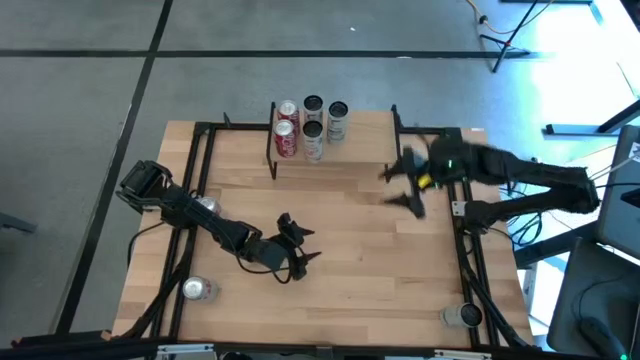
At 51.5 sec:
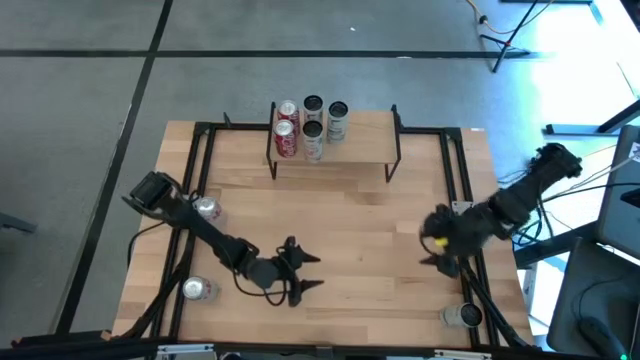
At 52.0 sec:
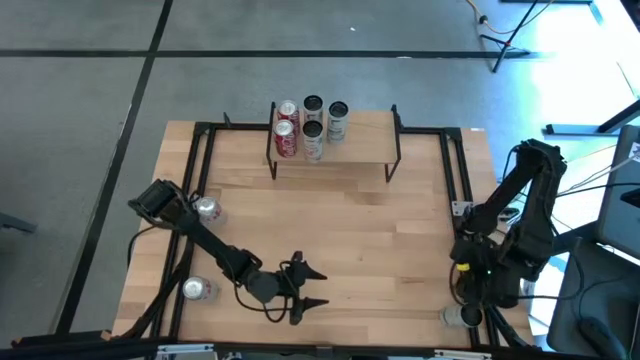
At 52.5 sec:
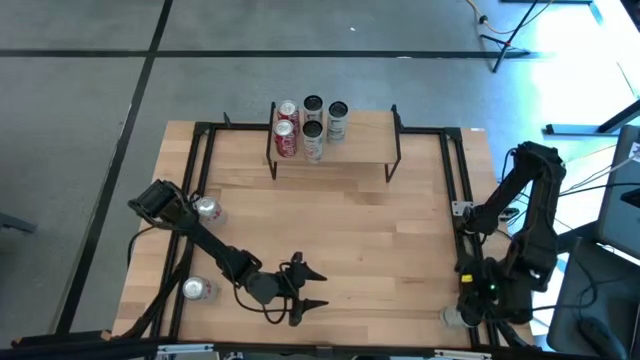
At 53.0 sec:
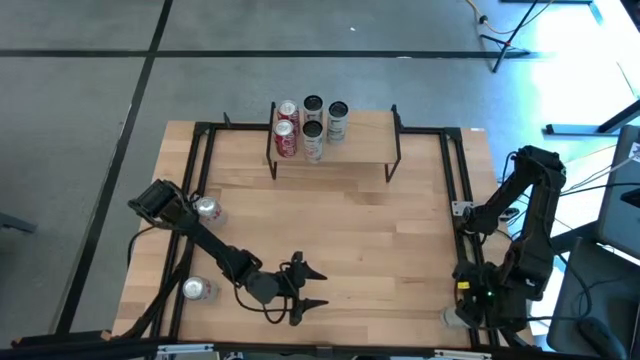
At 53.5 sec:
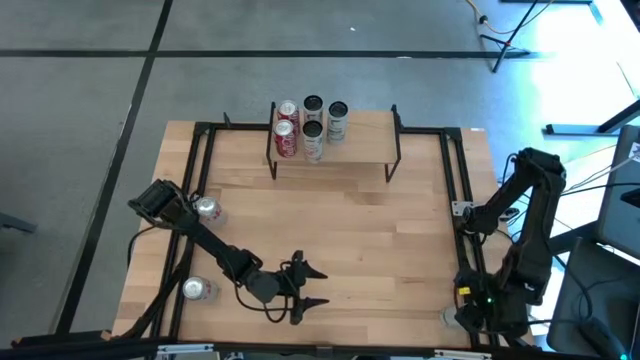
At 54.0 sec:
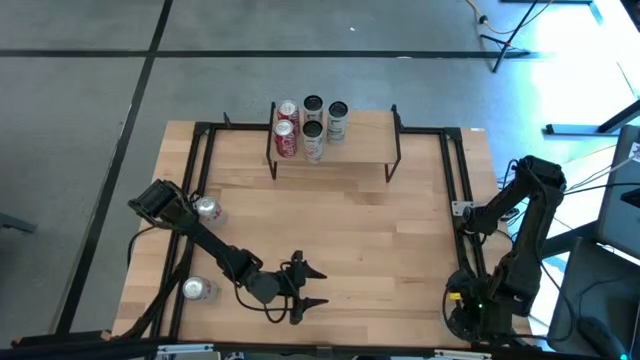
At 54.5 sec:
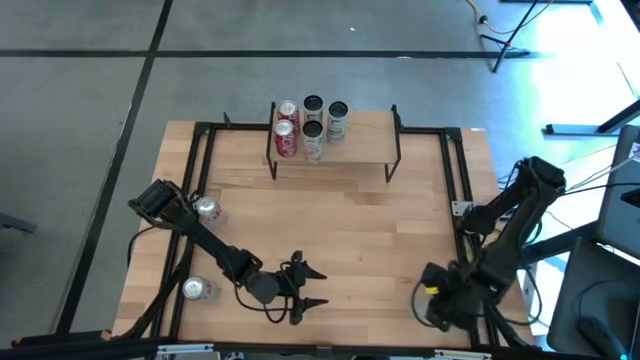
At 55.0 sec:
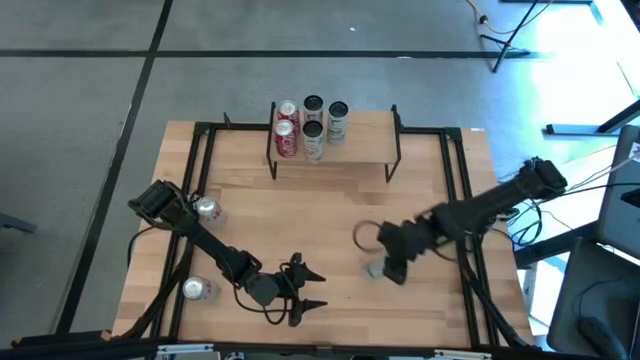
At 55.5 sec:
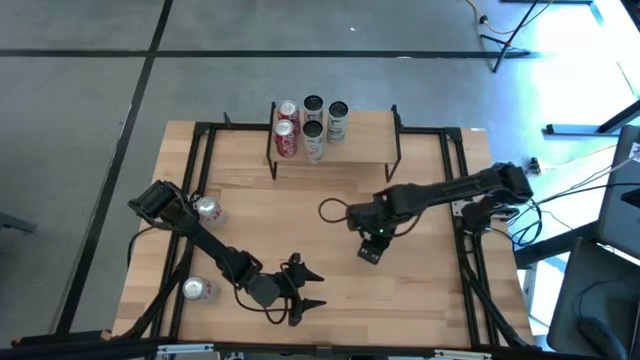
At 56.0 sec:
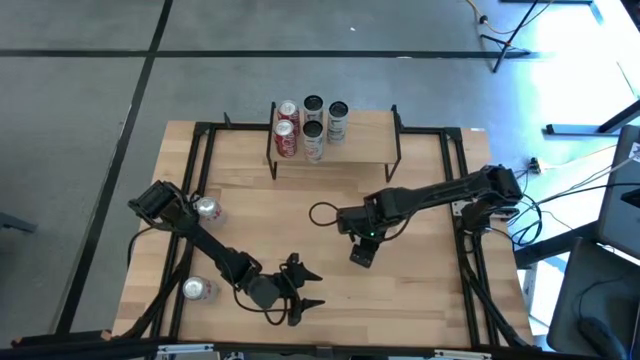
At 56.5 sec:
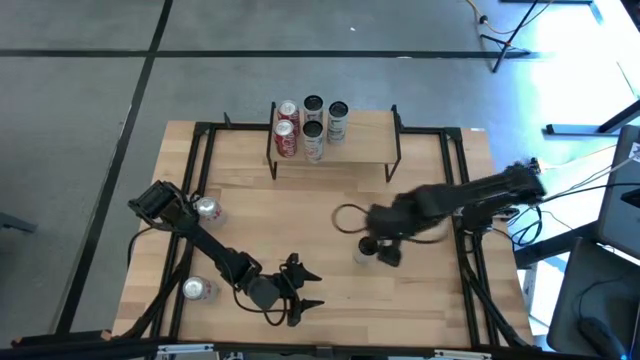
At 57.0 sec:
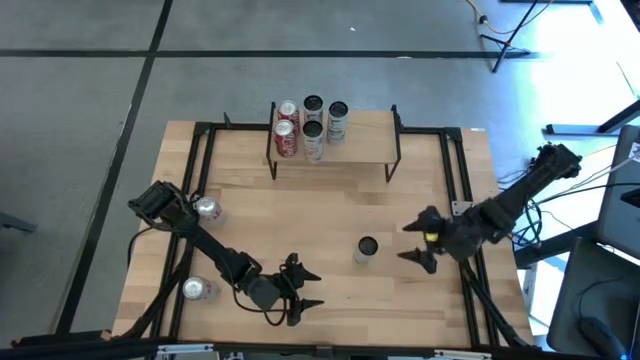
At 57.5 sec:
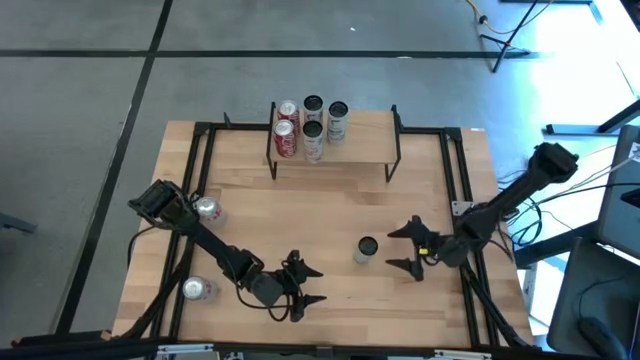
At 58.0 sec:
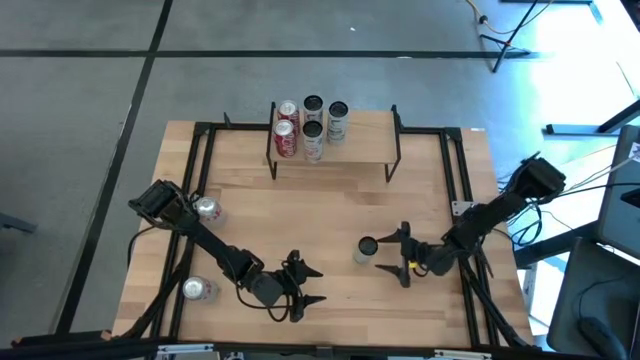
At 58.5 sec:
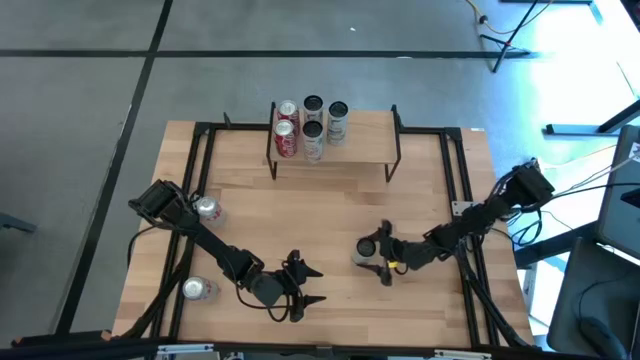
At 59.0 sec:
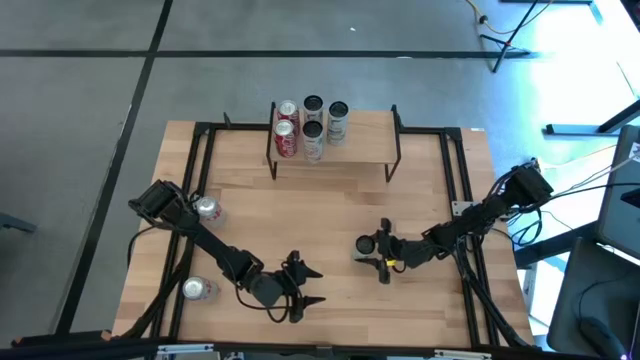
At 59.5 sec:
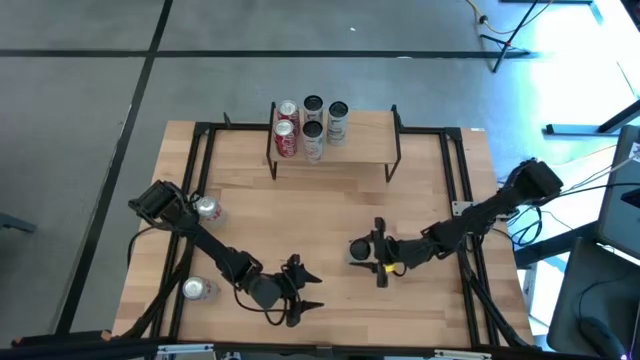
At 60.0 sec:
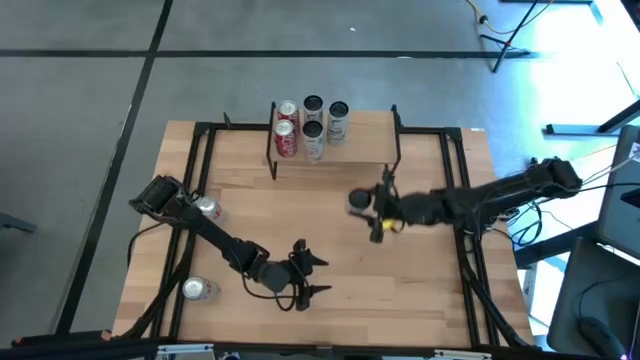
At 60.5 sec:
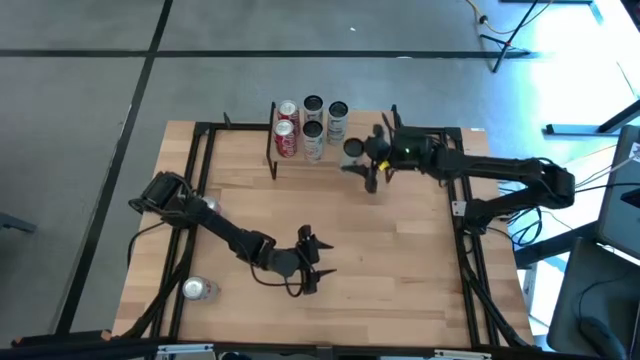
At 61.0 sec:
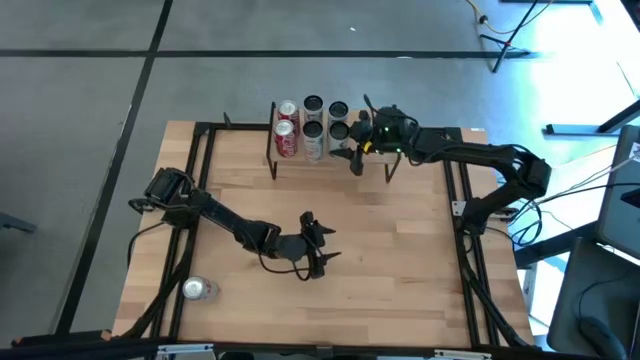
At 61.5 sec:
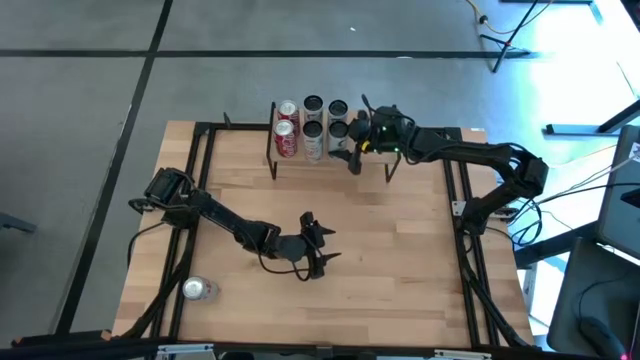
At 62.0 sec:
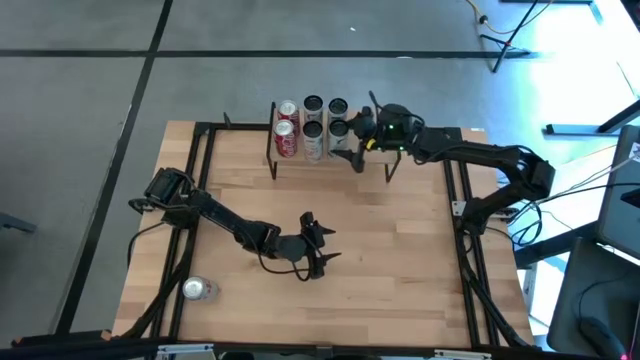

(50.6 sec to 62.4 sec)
Task: Place canned beverage on shelf
Put the white-blue soda can aligned with the other white-blue soda can on the shelf

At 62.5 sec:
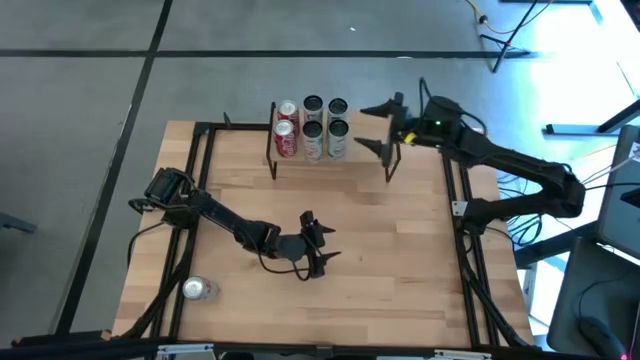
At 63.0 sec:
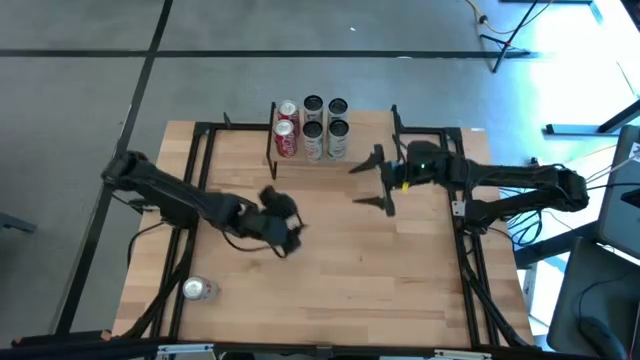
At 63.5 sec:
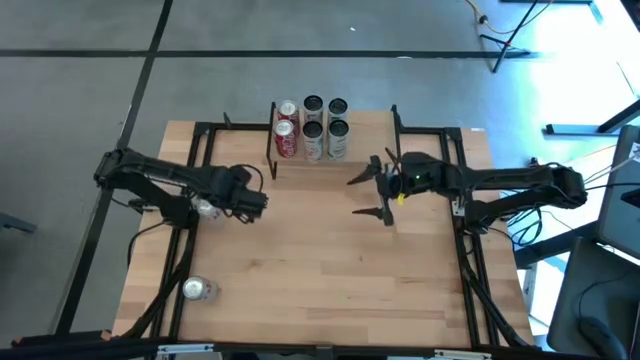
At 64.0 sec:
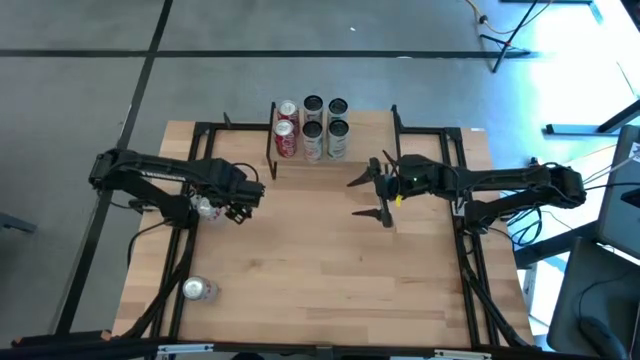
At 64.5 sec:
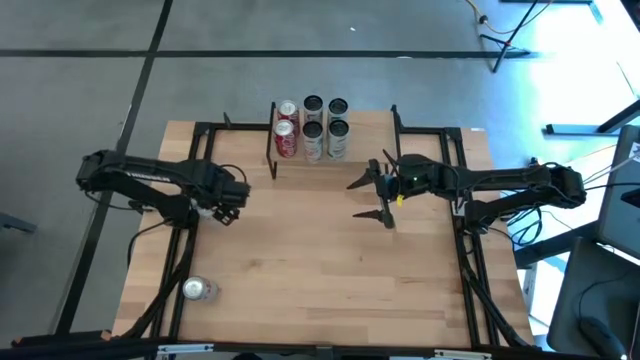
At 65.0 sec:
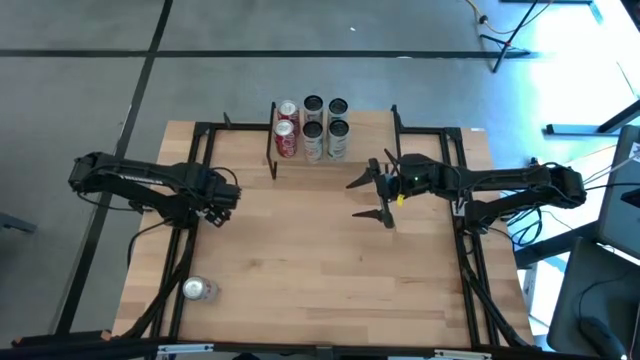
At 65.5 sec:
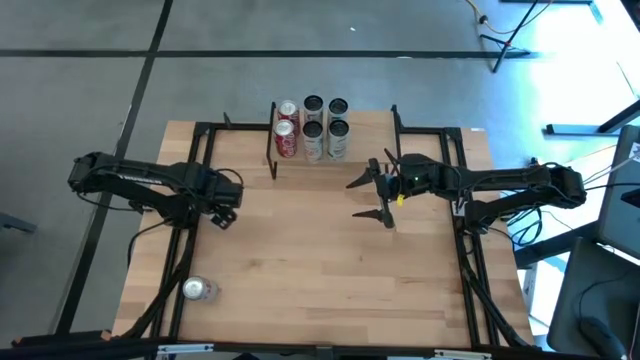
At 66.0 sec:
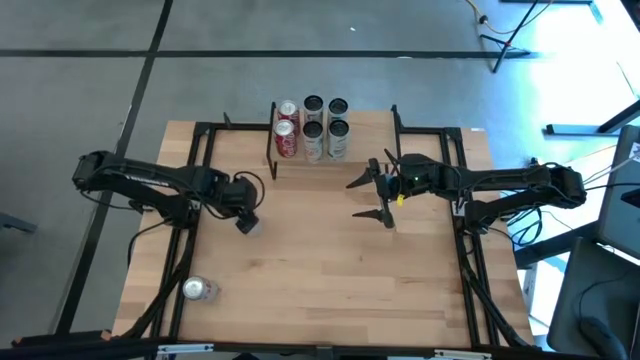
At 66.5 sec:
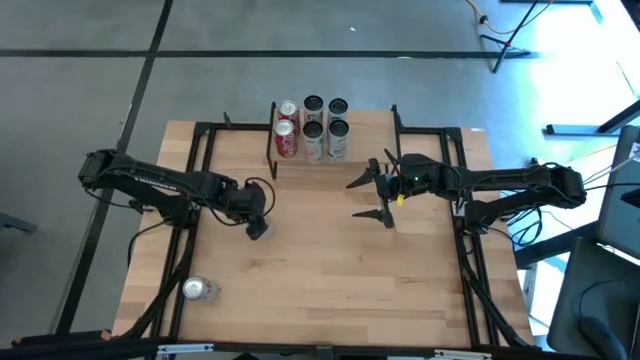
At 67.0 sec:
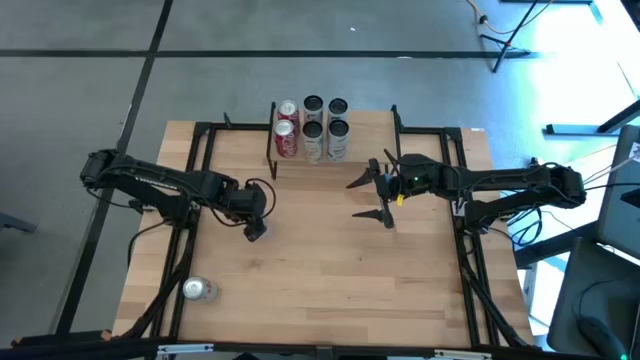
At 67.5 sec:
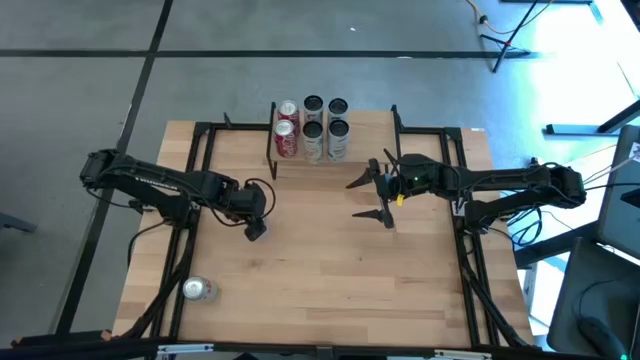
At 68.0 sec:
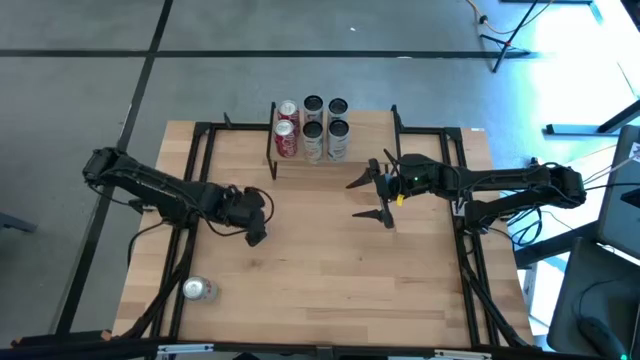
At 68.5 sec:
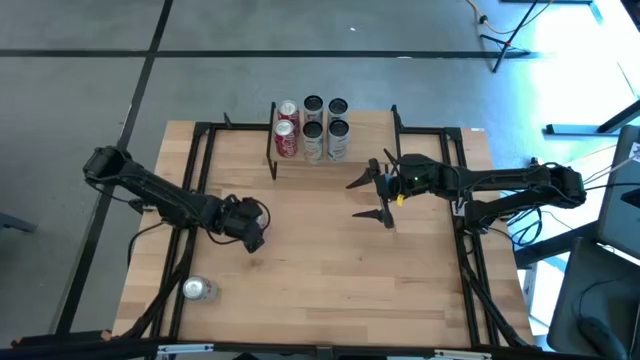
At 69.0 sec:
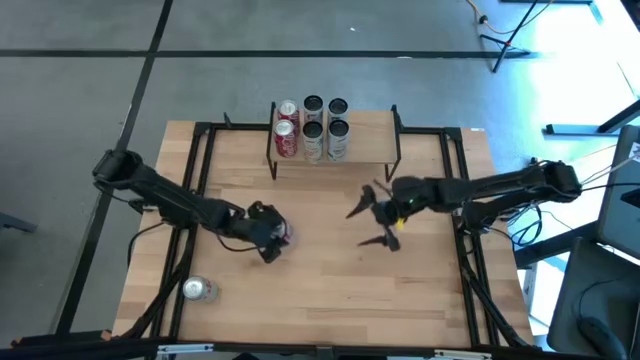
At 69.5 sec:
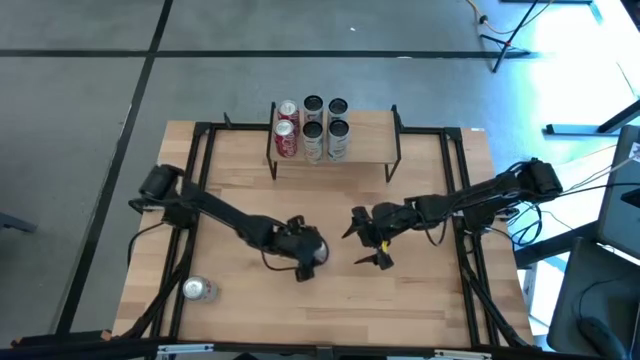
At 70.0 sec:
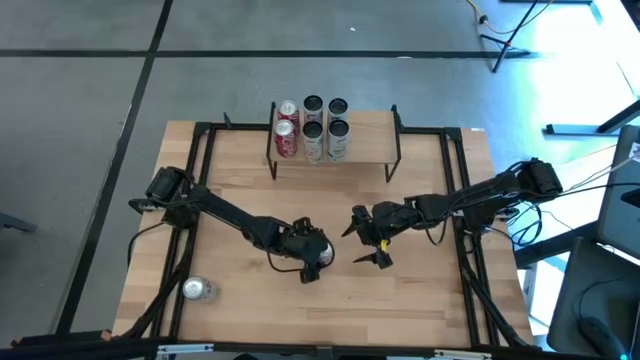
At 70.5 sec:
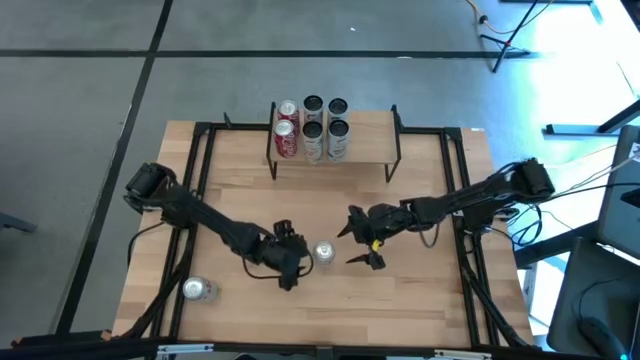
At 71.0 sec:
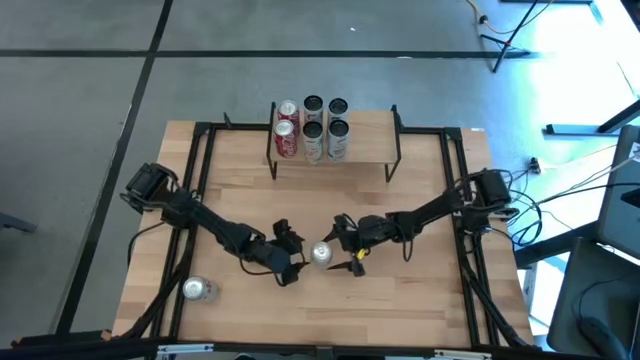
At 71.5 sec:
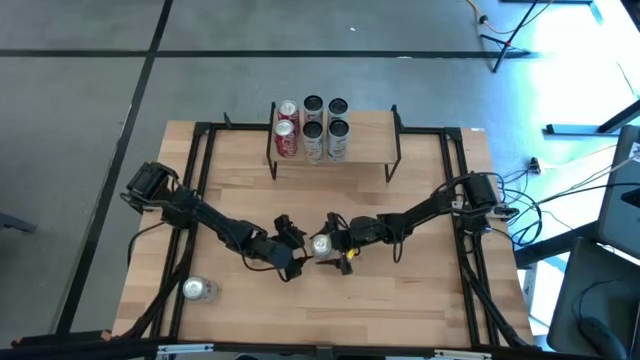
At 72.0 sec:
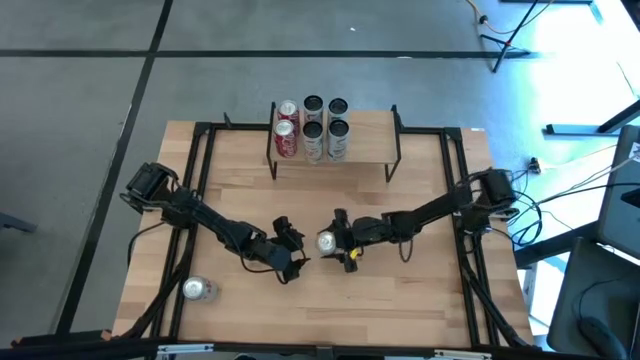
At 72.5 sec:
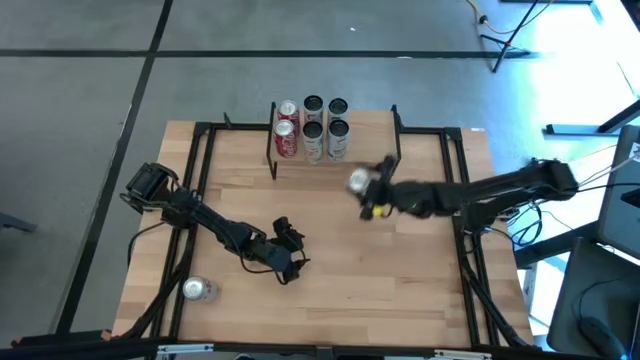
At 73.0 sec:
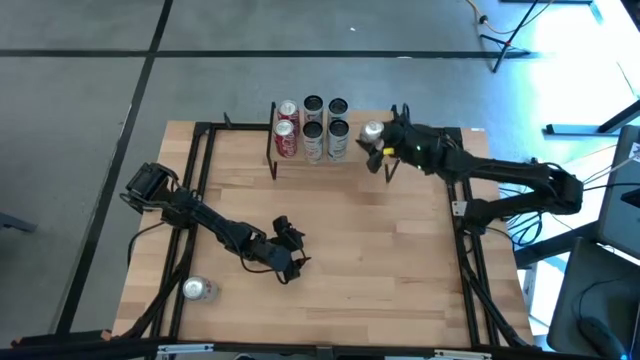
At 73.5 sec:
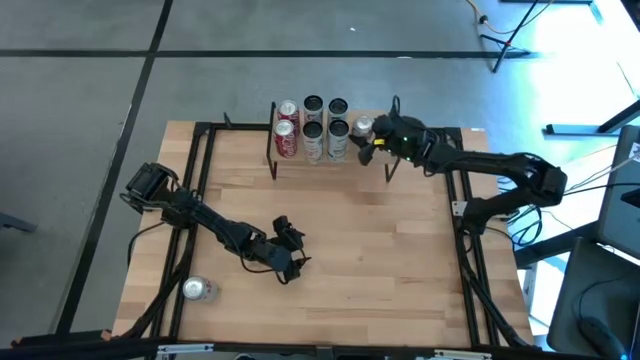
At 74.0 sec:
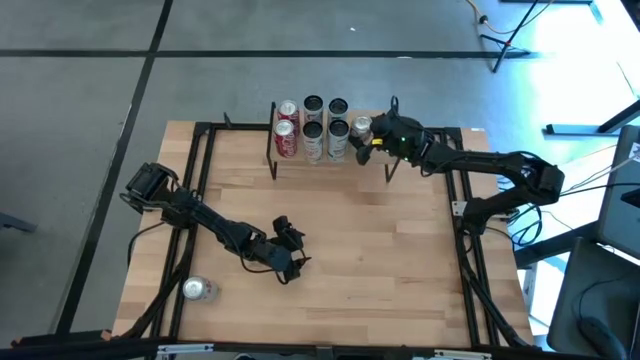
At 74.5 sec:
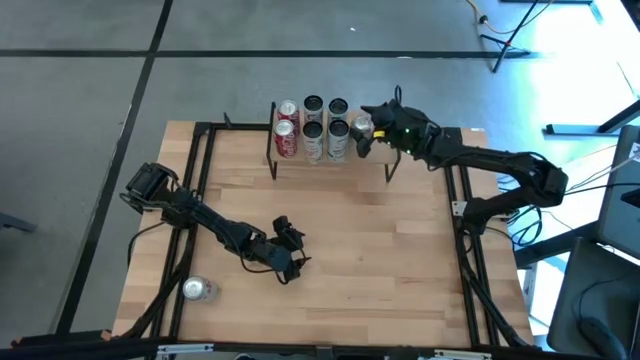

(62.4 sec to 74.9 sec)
Put the top red-silver soda can on the shelf
